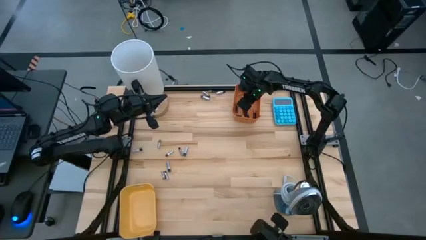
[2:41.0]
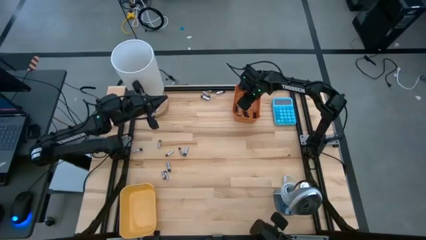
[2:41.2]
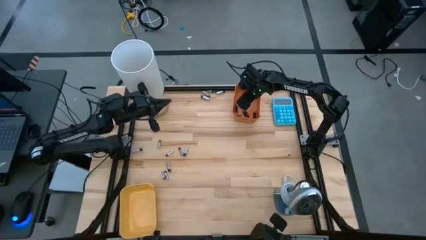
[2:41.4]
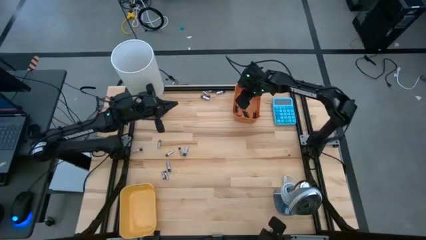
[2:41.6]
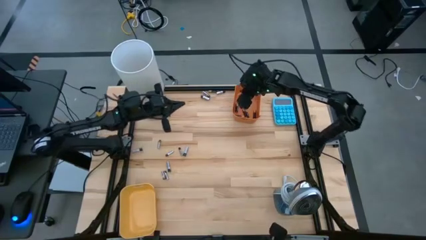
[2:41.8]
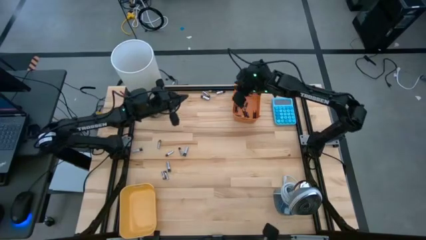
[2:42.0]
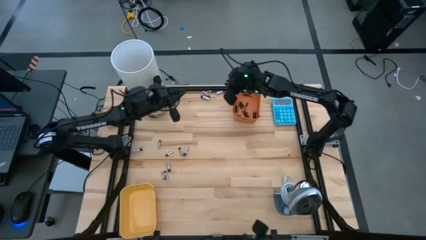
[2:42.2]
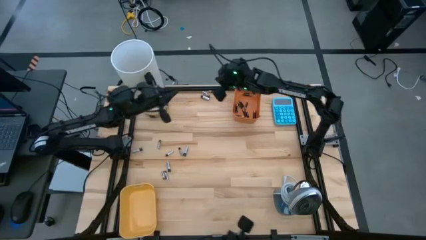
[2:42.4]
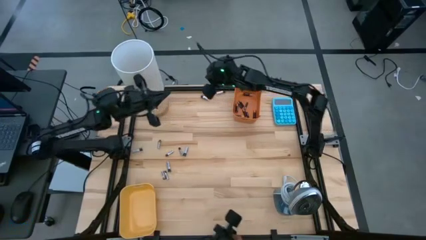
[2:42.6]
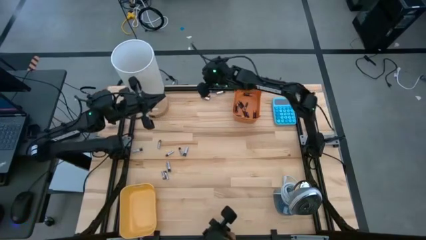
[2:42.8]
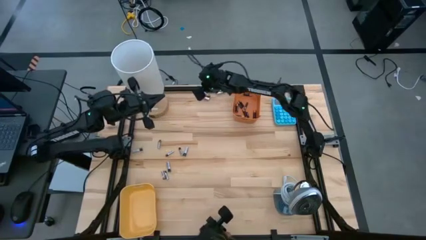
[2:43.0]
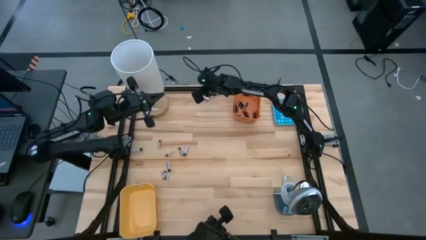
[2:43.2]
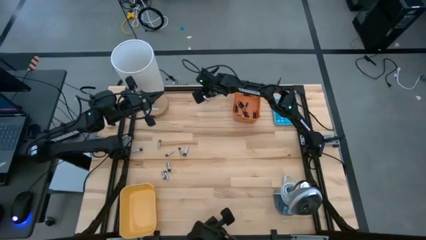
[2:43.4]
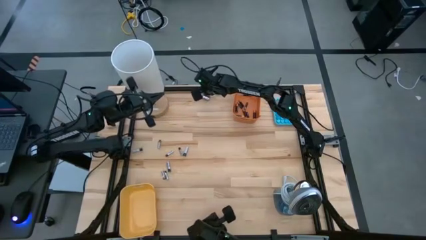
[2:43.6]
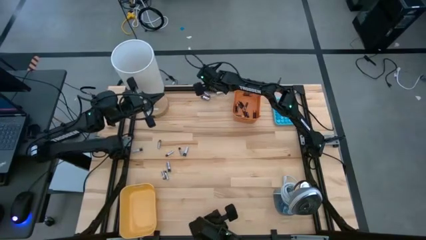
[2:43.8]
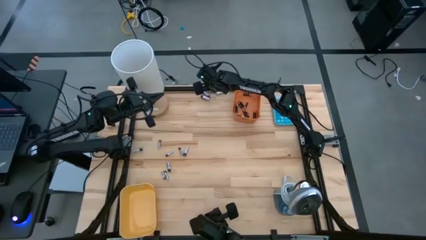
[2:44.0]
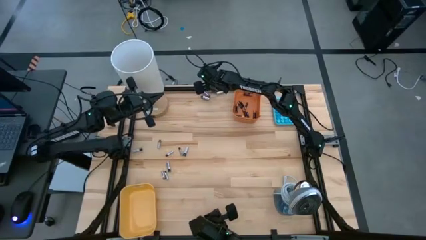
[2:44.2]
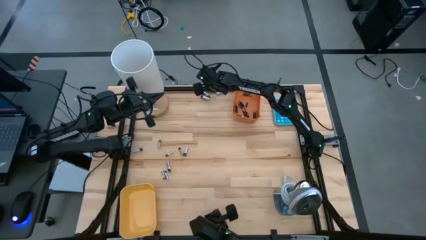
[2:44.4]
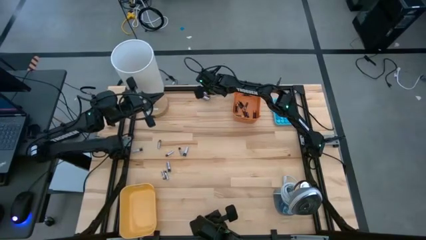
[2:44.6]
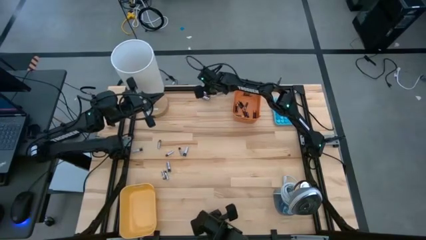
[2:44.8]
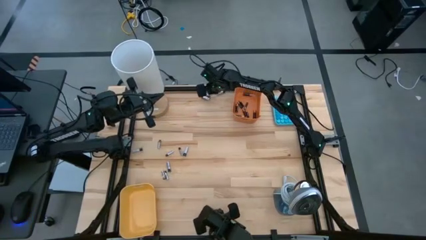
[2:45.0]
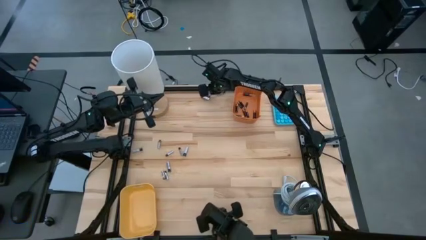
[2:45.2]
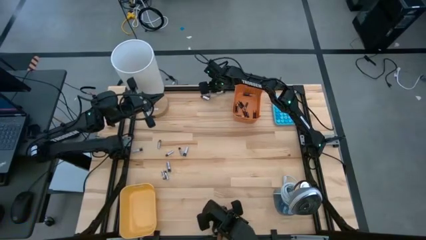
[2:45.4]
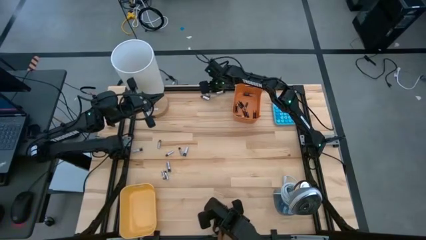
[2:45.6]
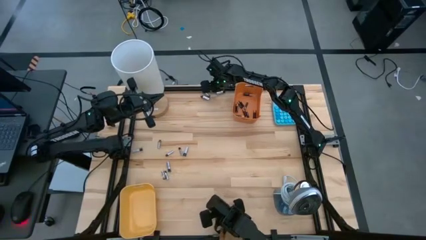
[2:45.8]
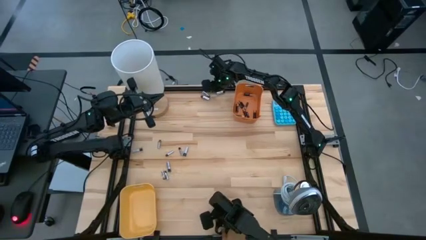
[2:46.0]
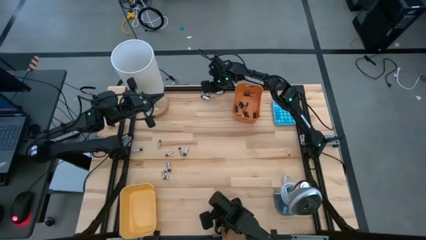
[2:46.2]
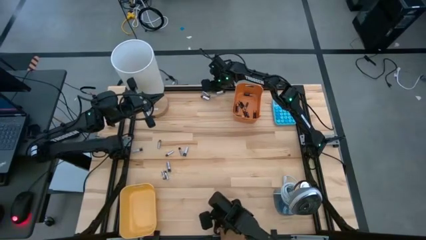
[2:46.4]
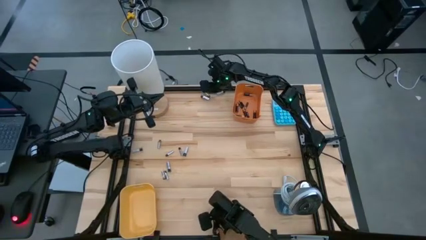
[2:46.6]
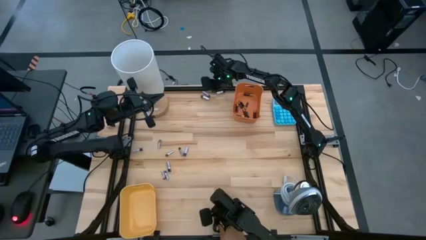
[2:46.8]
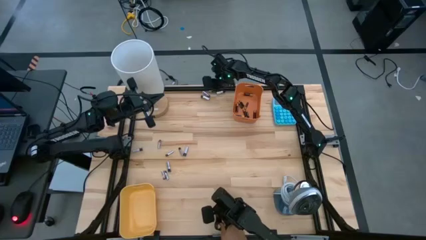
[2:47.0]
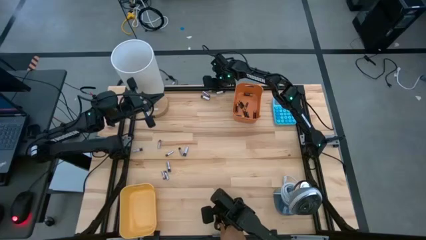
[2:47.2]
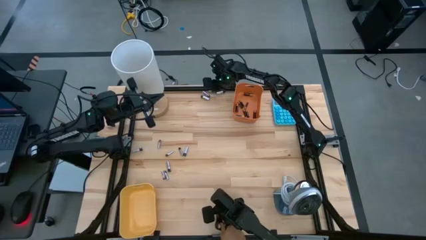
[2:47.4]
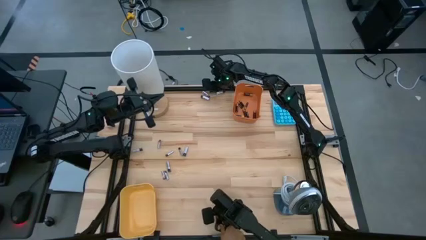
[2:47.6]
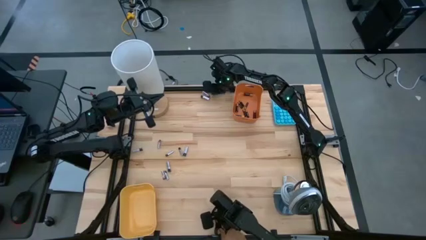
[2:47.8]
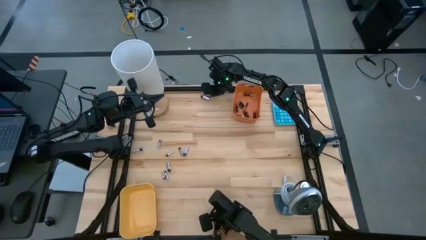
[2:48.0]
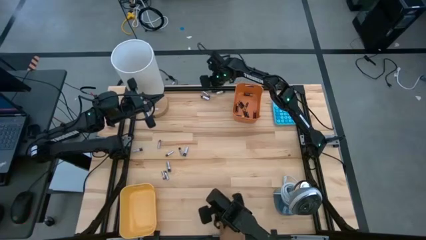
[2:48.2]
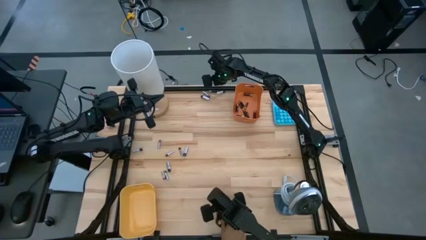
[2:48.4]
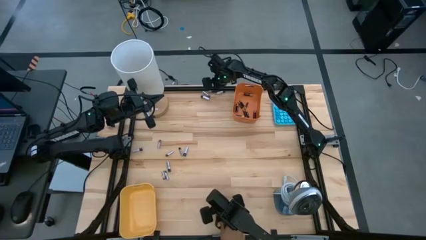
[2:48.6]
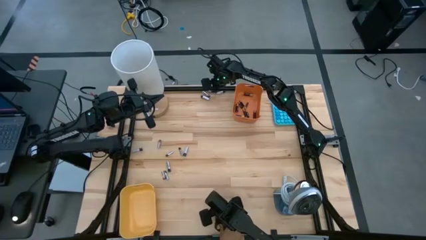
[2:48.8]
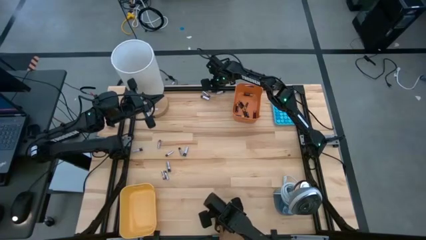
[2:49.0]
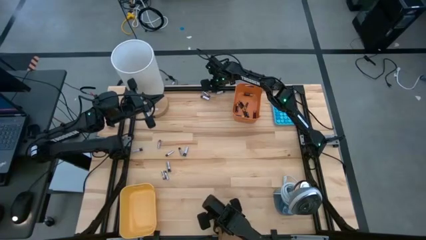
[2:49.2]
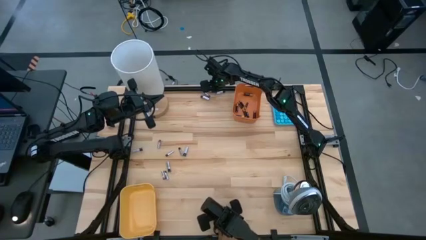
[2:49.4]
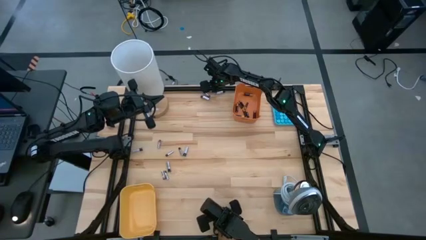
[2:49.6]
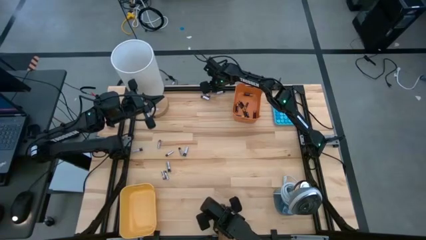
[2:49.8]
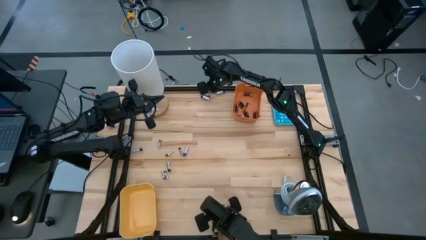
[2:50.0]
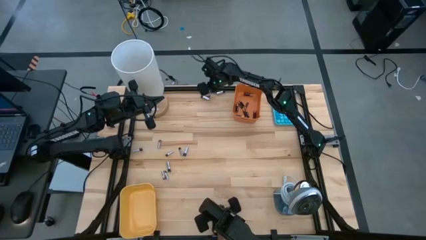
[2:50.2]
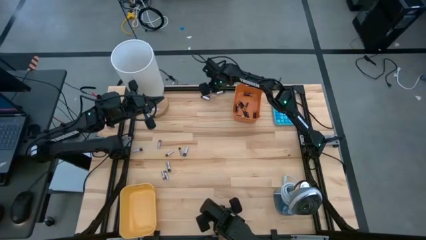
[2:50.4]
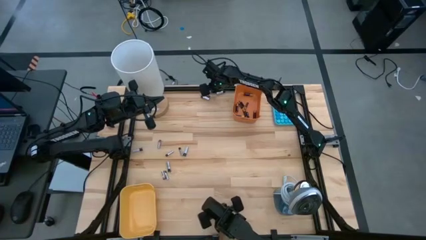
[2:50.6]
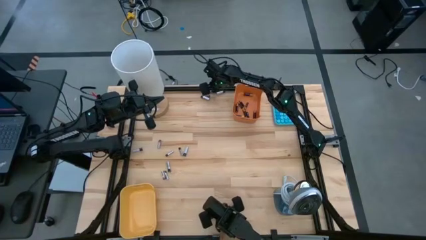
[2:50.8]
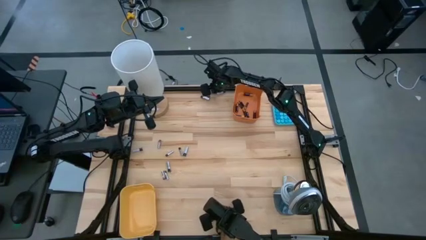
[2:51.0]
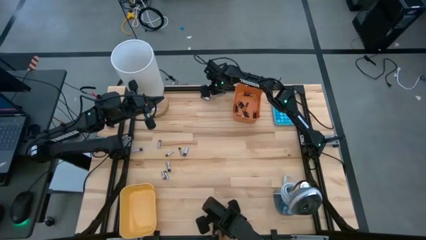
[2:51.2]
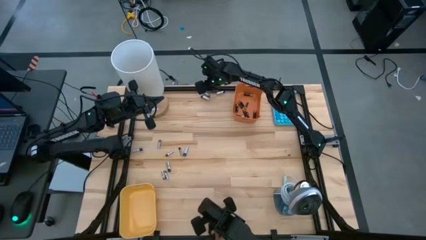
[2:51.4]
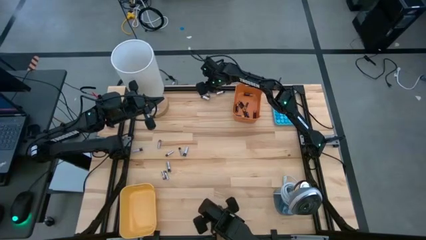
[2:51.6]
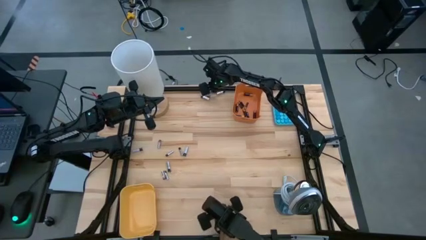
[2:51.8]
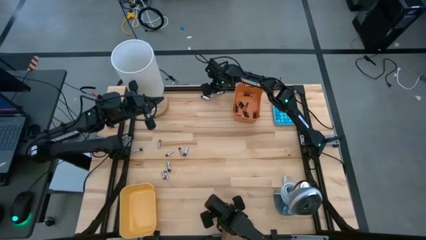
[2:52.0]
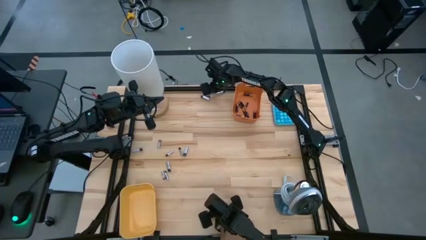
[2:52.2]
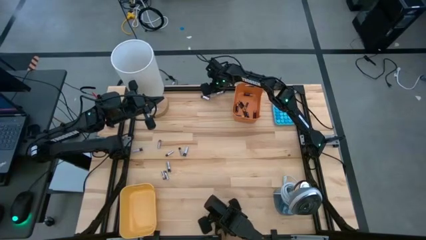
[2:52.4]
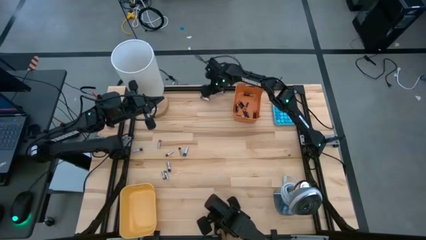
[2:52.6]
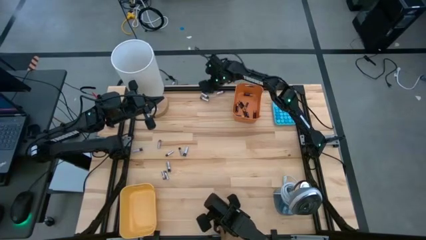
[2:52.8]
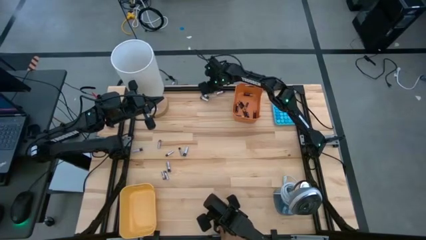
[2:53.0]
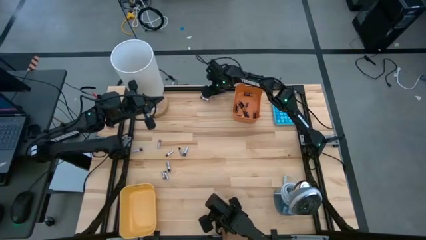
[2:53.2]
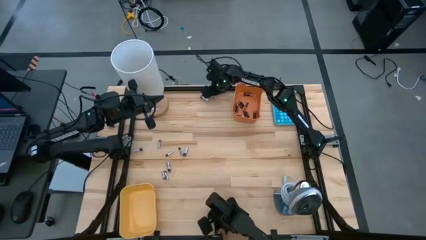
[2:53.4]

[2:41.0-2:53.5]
Task: Sort batteries
Put the black battery into the orange bin
